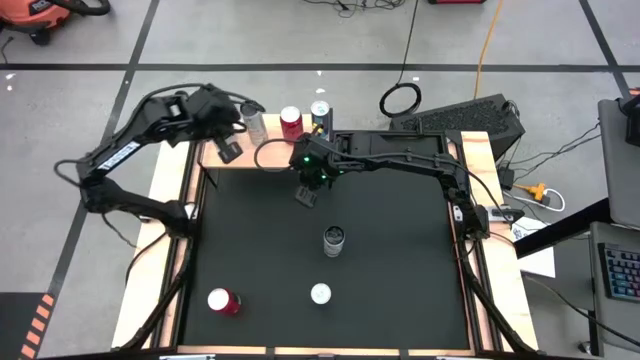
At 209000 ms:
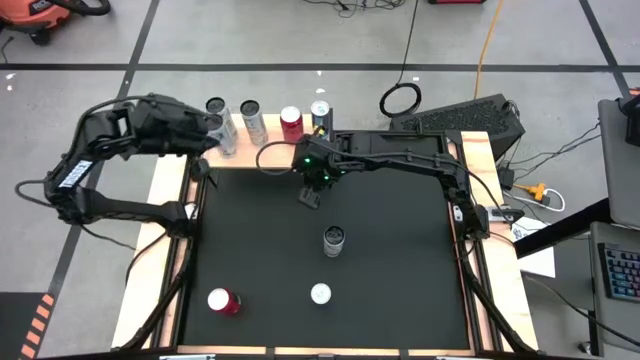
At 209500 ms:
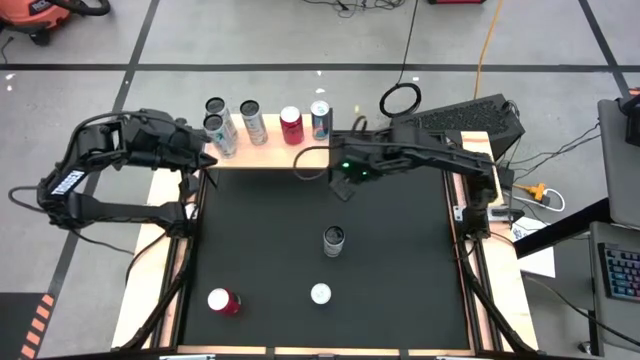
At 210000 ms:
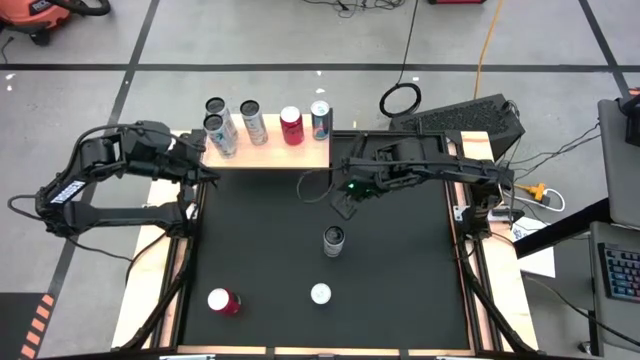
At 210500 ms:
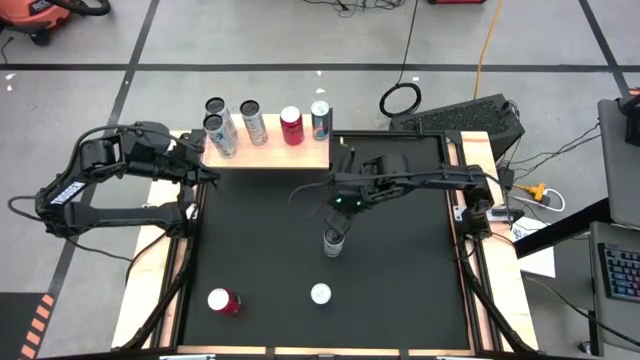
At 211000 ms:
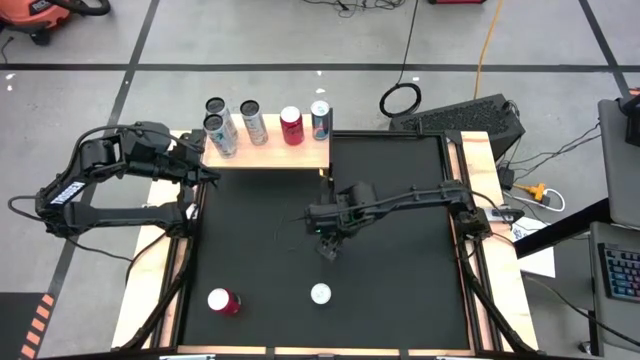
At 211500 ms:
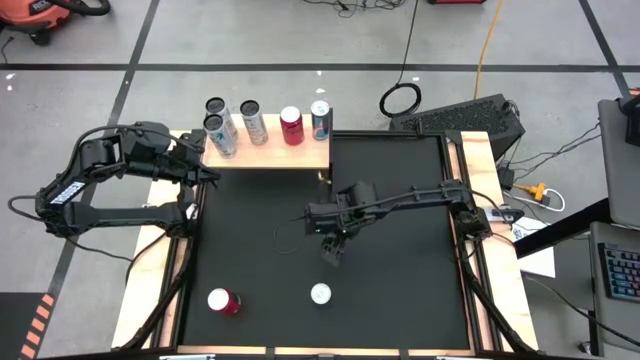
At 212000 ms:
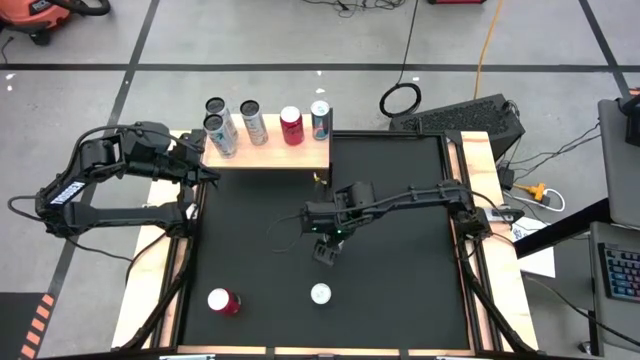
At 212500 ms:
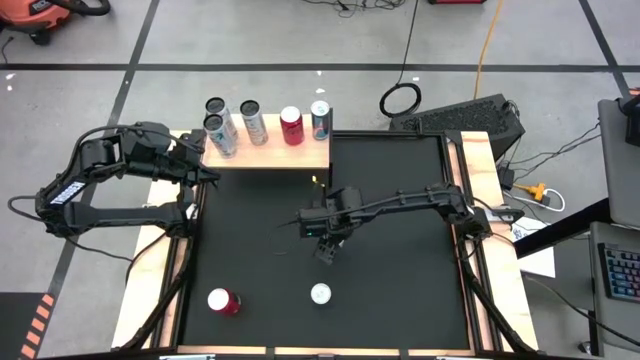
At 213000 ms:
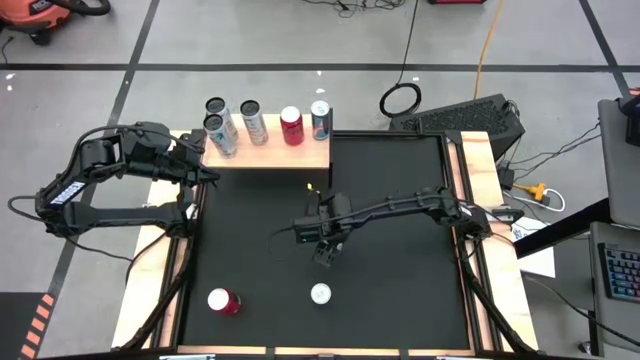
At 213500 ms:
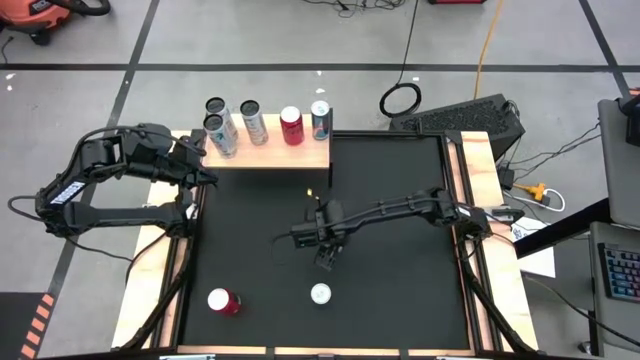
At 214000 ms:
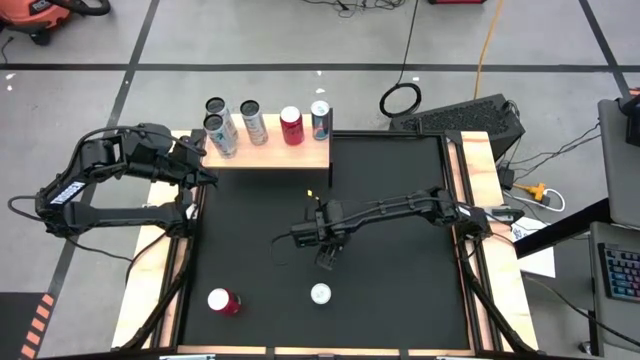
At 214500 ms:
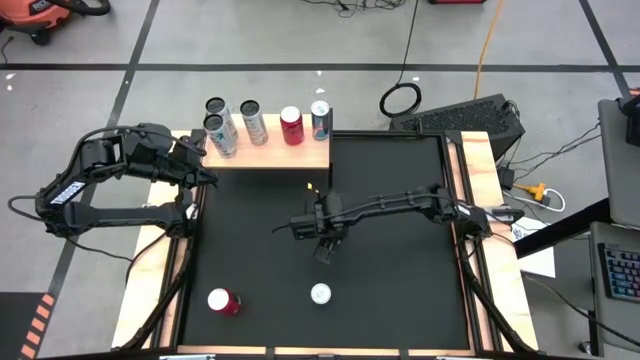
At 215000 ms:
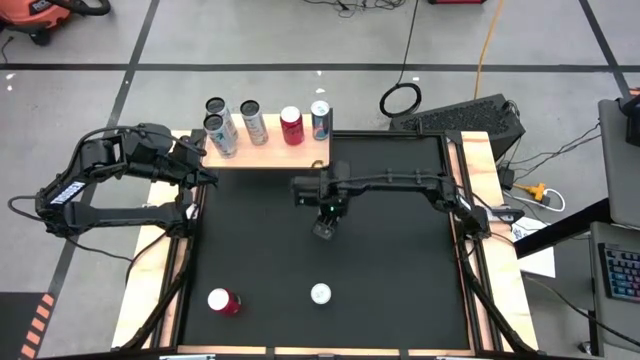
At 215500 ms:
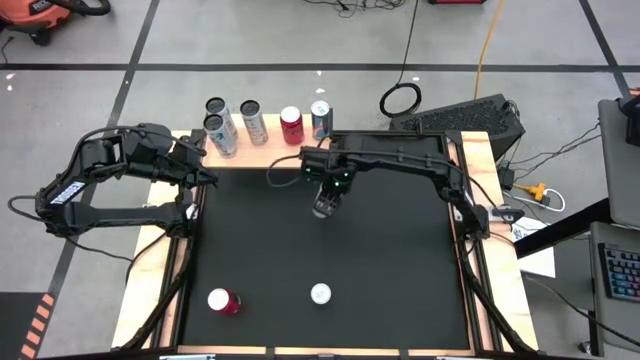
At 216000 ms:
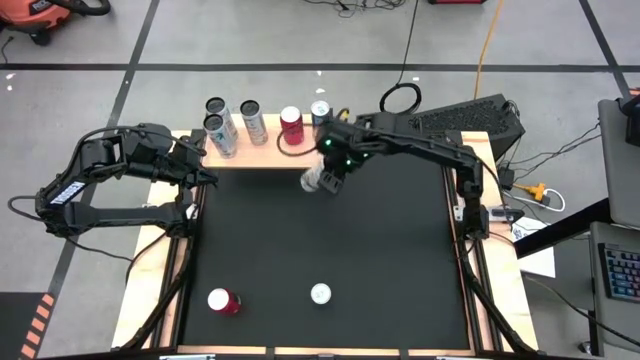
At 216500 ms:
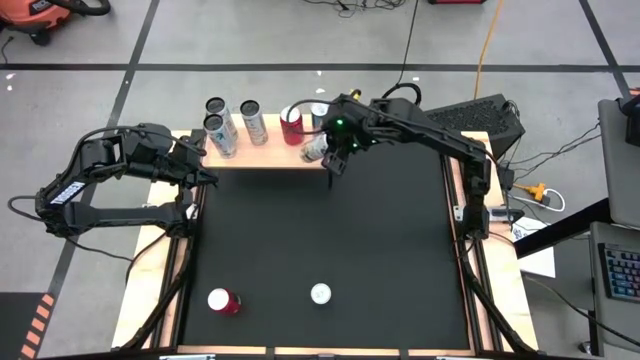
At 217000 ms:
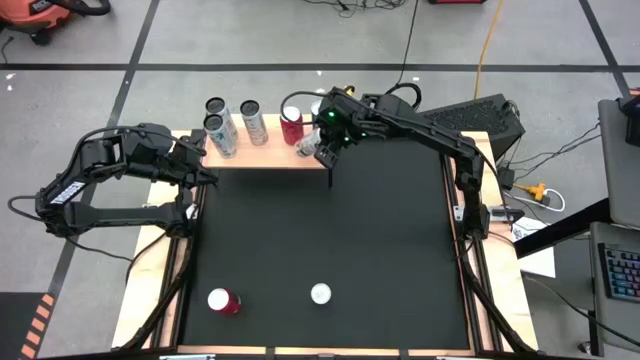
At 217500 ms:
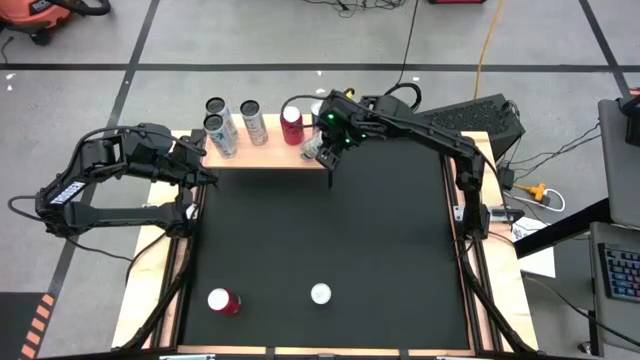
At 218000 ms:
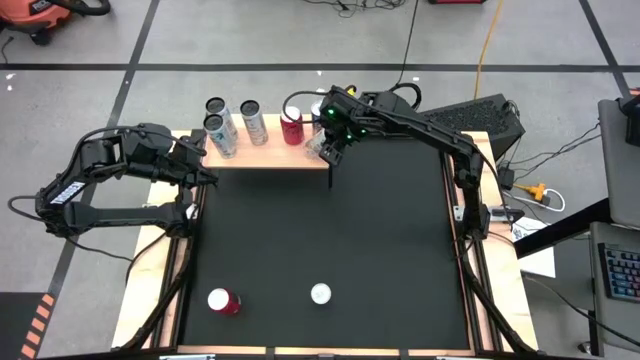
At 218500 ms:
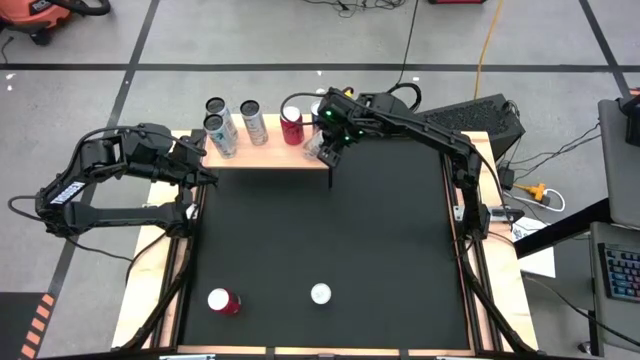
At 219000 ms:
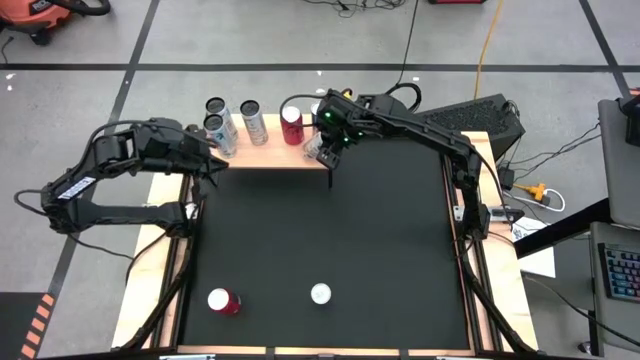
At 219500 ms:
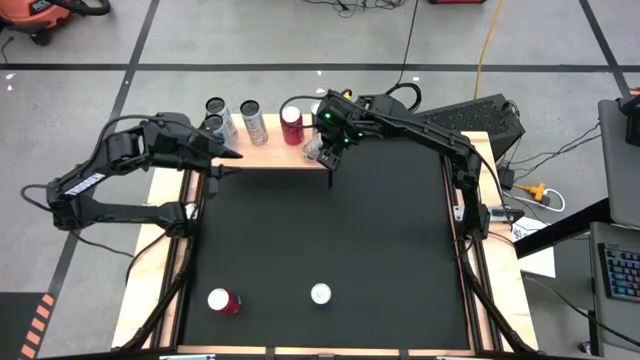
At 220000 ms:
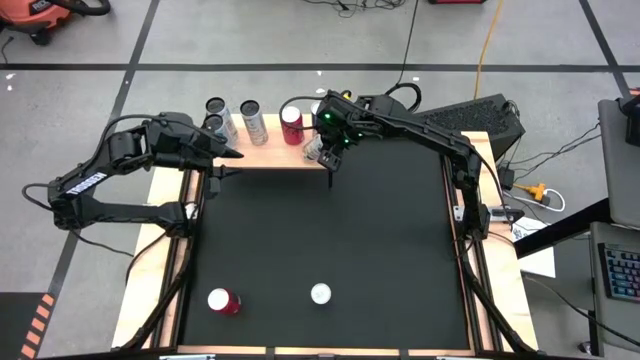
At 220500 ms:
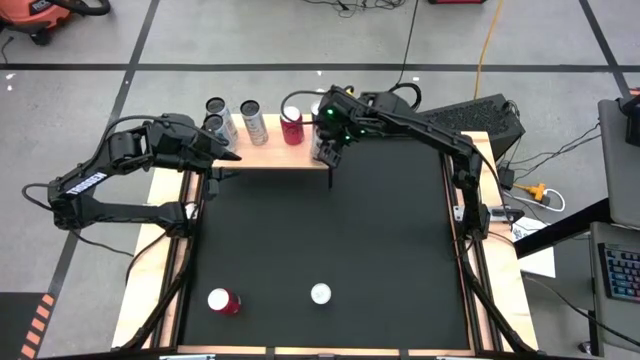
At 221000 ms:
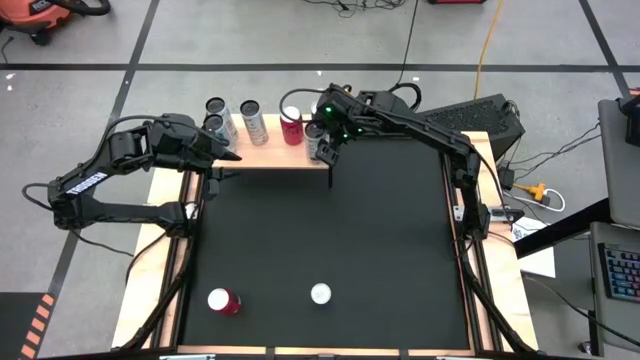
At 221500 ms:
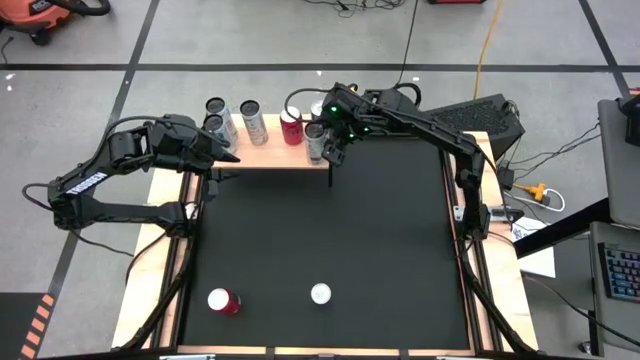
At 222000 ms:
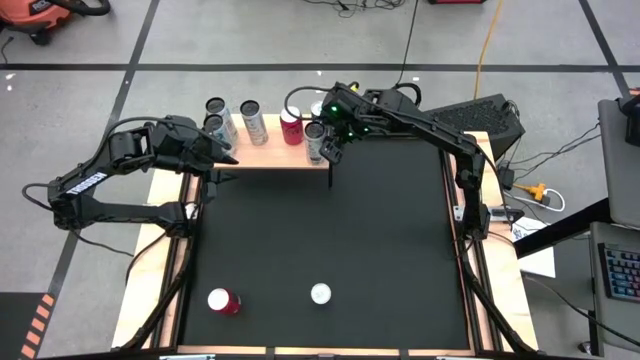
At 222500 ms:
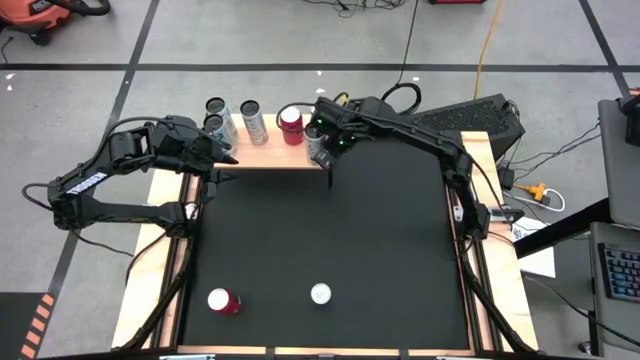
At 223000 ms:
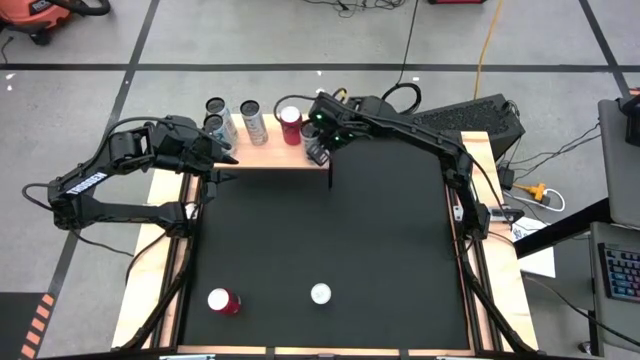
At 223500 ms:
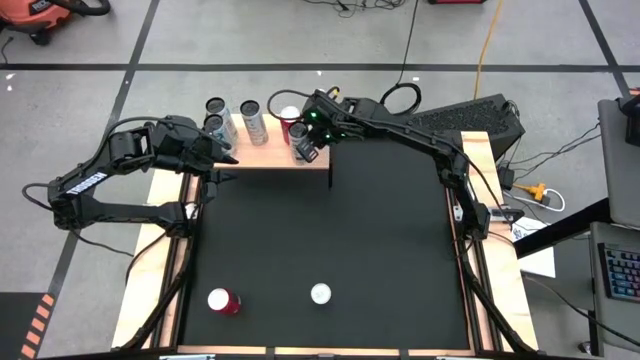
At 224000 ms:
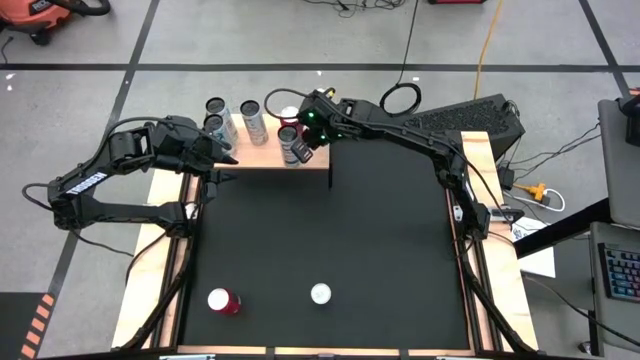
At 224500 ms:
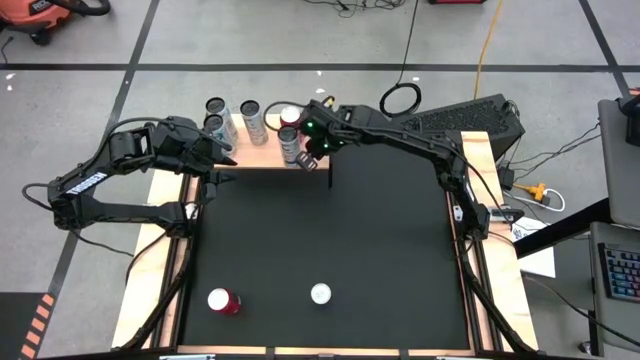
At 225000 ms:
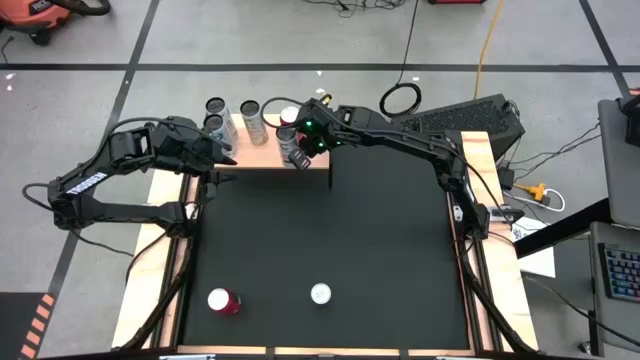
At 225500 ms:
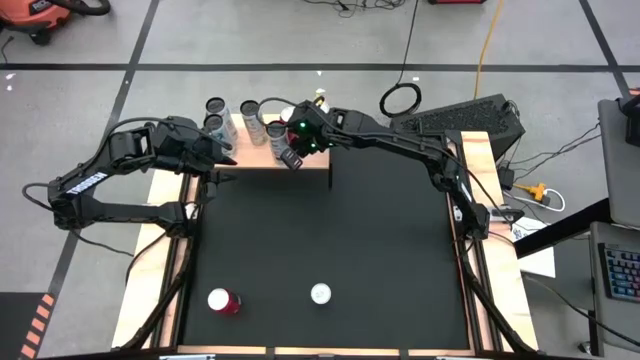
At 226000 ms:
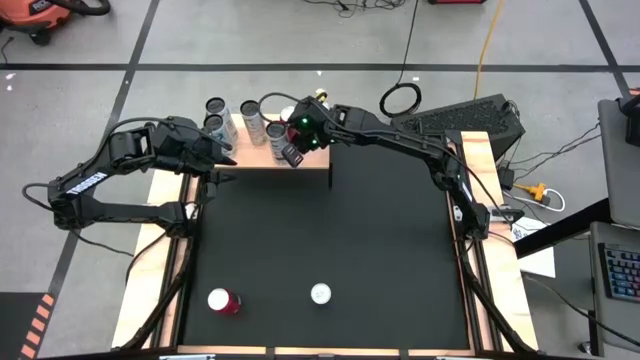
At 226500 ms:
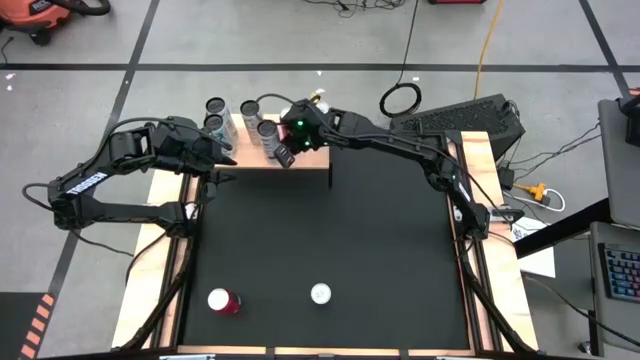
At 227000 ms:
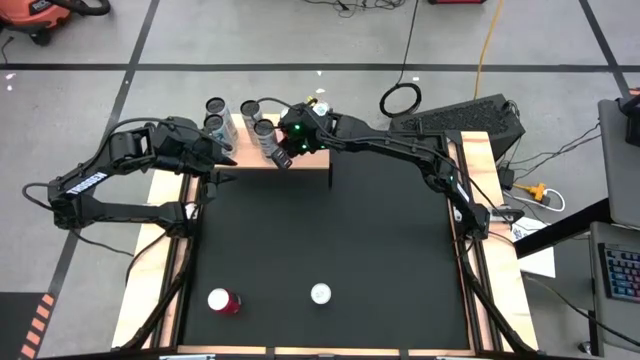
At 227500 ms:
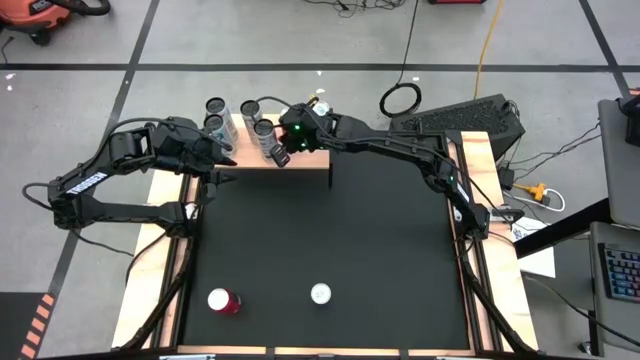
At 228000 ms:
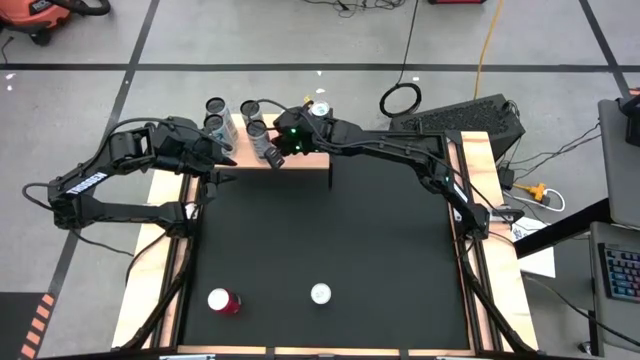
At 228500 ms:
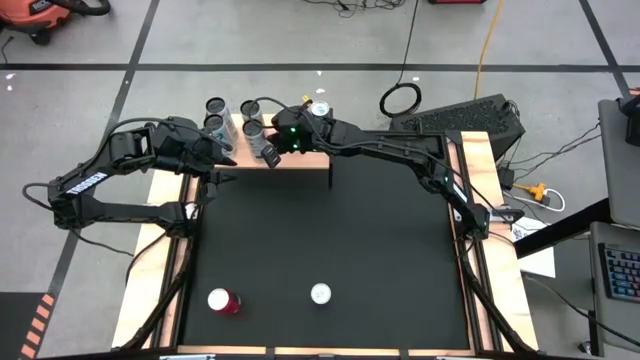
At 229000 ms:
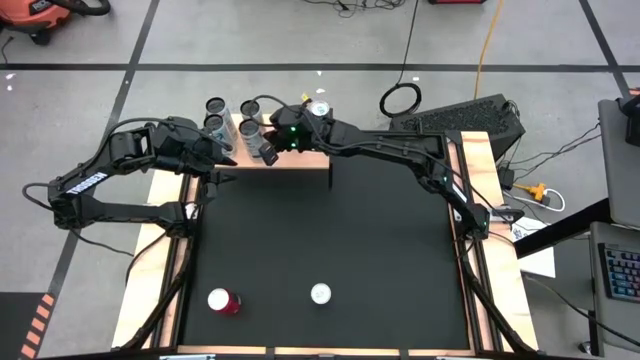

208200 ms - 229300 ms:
Task: Place canned beverage on shelf
Put the white yellow soda can aligned with the white yellow soda can on the shelf
